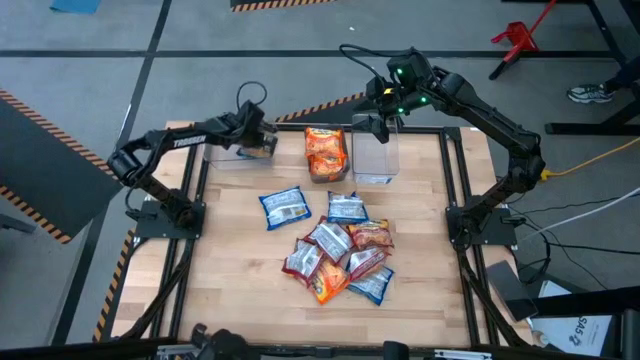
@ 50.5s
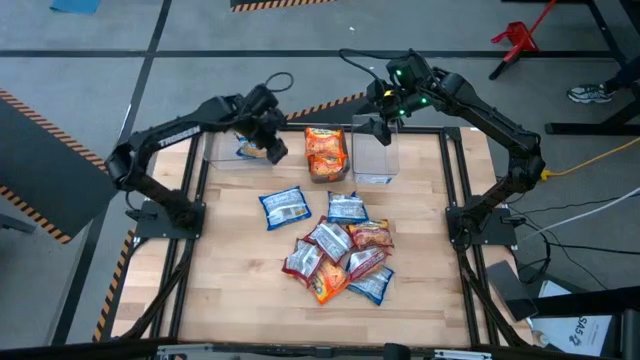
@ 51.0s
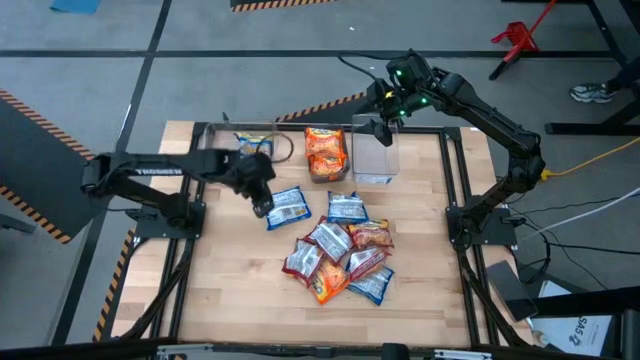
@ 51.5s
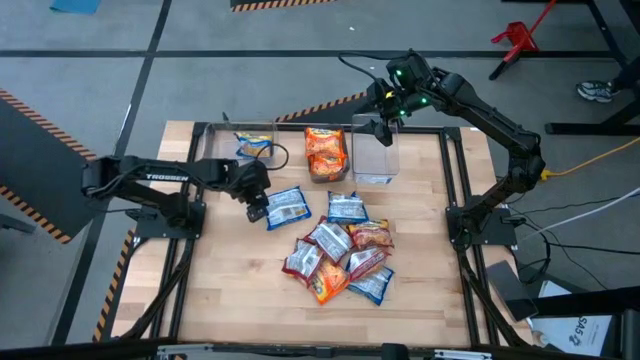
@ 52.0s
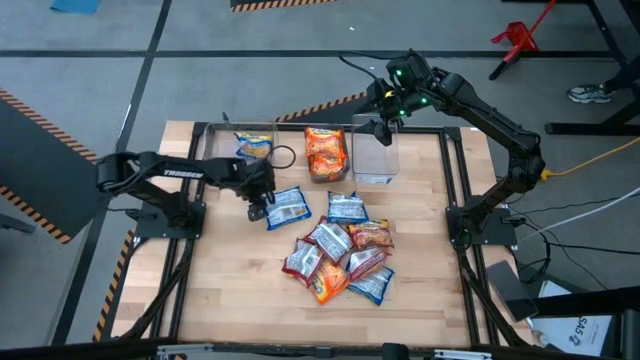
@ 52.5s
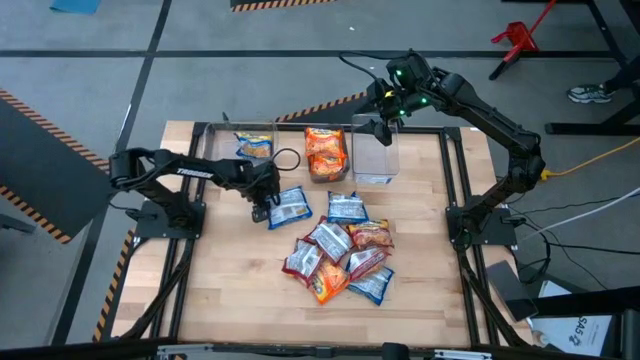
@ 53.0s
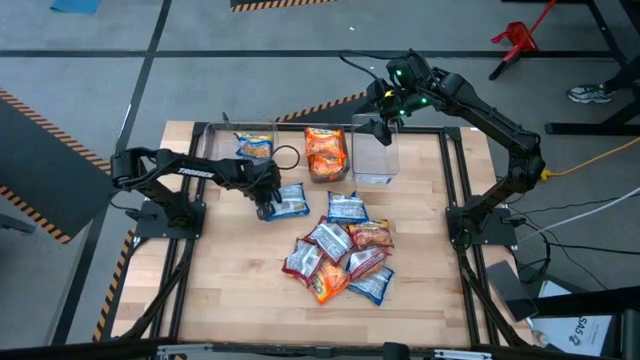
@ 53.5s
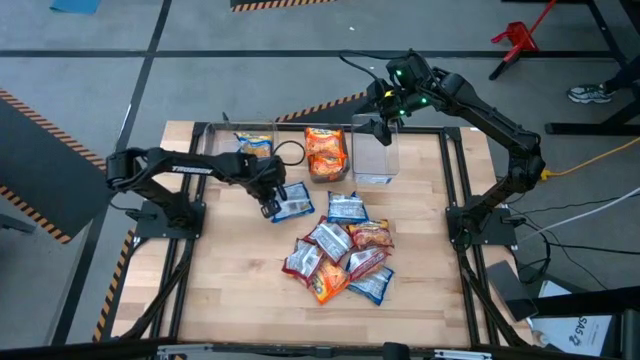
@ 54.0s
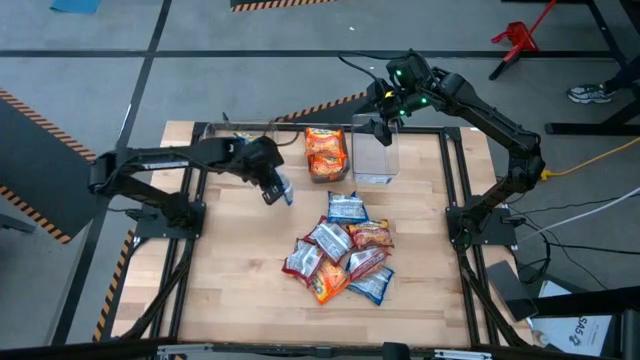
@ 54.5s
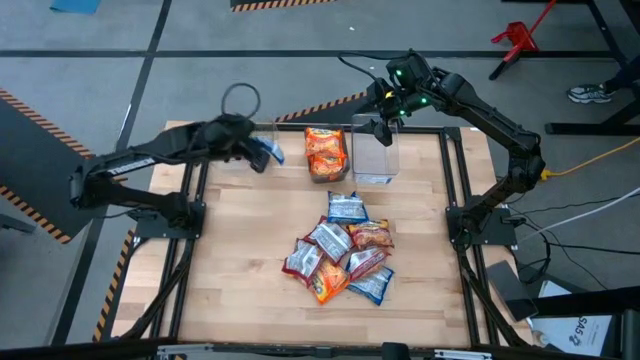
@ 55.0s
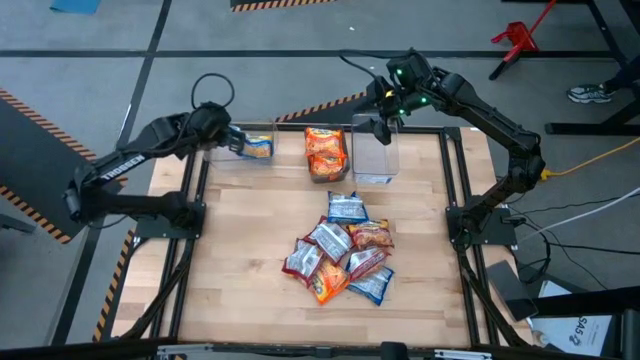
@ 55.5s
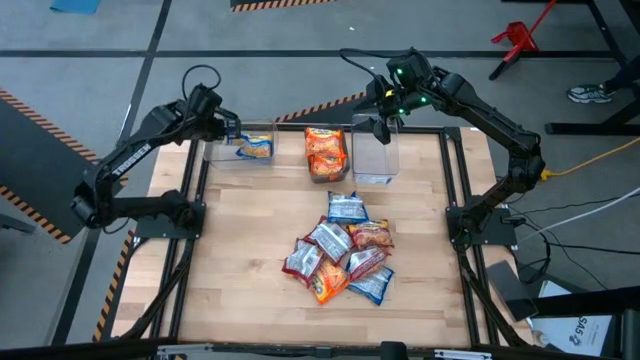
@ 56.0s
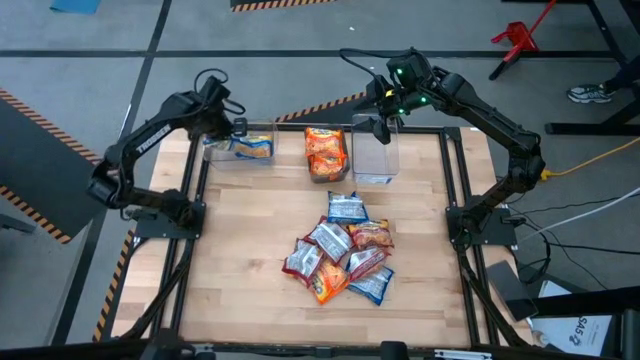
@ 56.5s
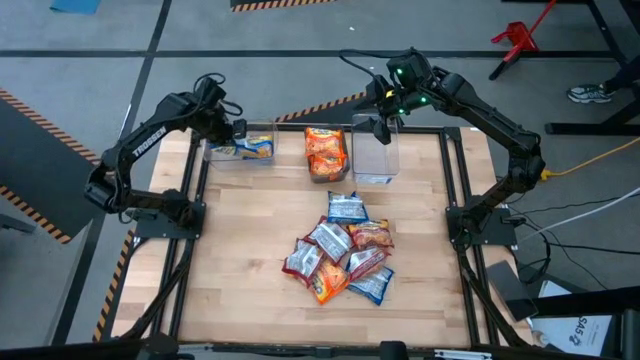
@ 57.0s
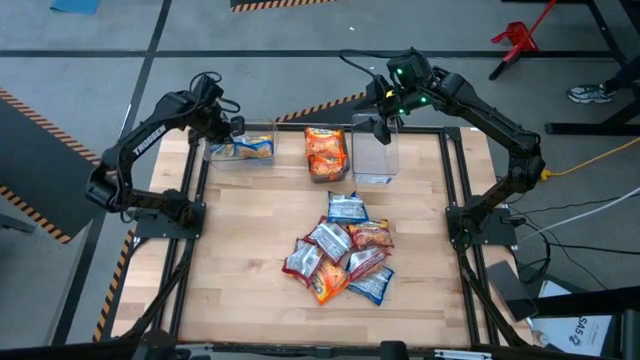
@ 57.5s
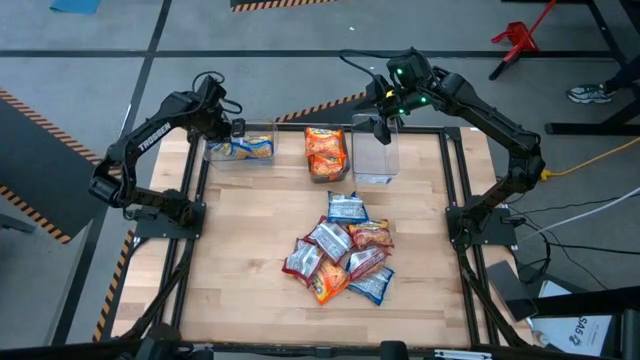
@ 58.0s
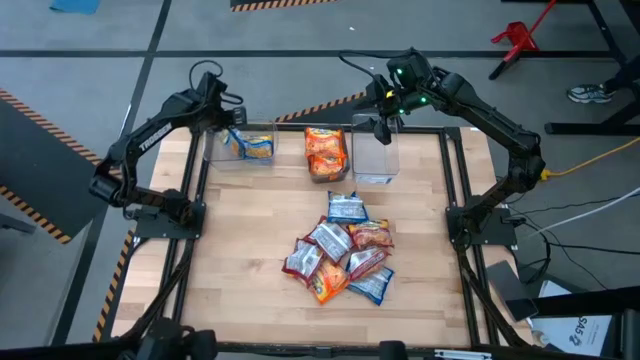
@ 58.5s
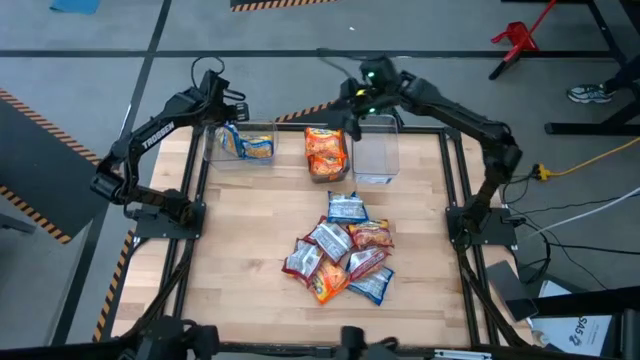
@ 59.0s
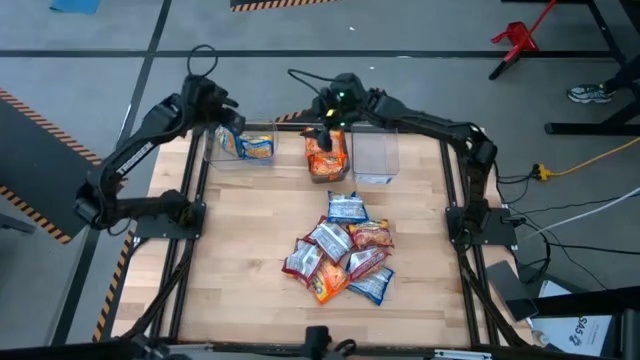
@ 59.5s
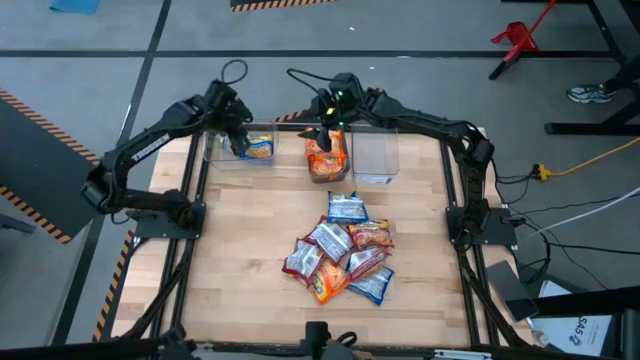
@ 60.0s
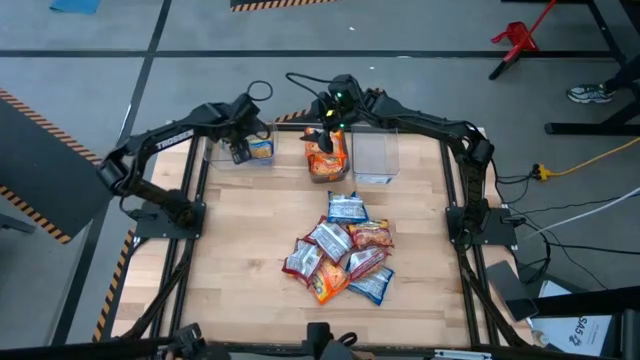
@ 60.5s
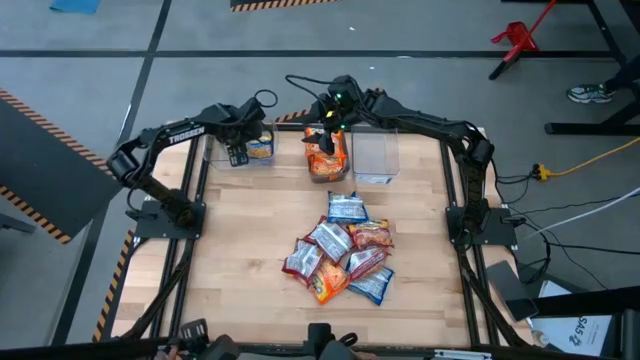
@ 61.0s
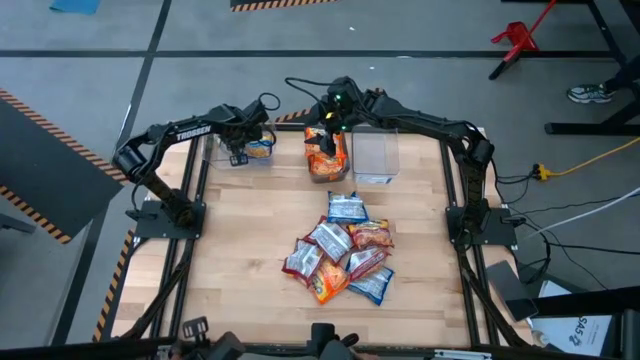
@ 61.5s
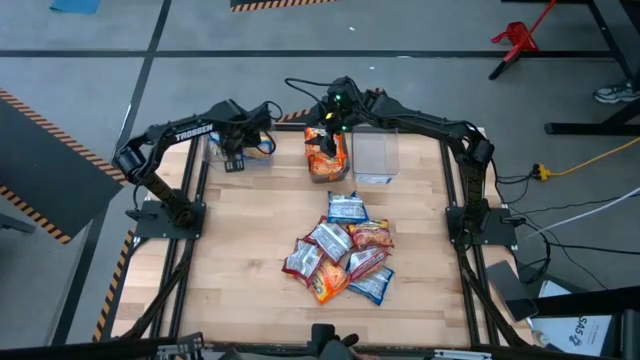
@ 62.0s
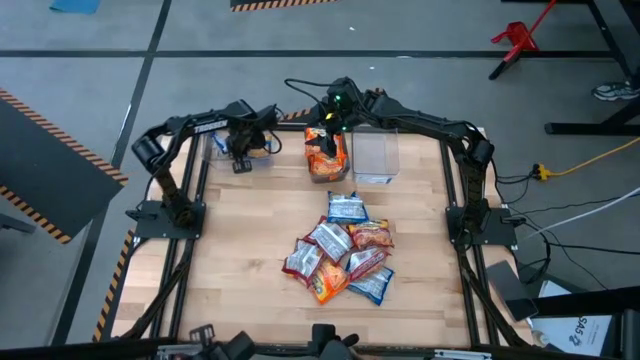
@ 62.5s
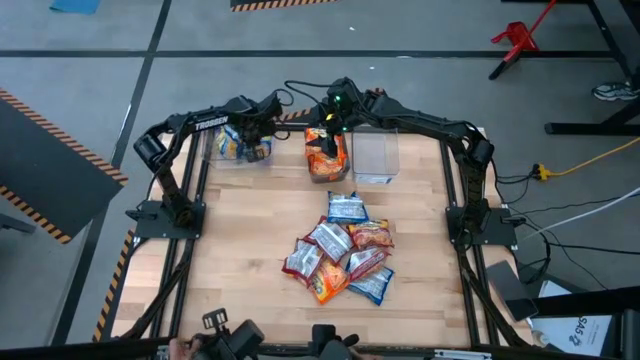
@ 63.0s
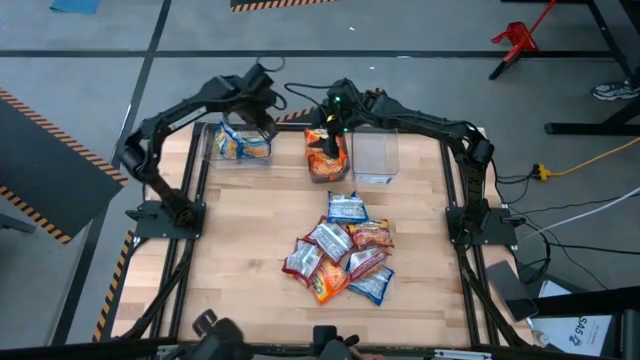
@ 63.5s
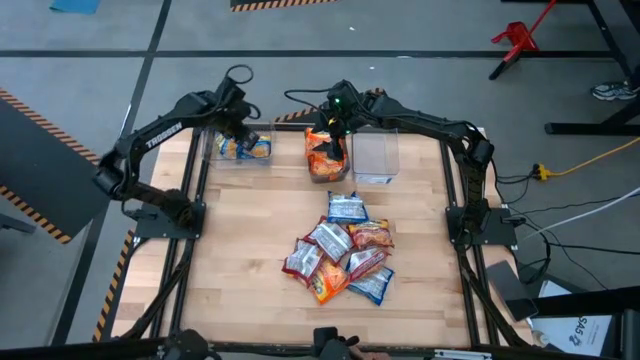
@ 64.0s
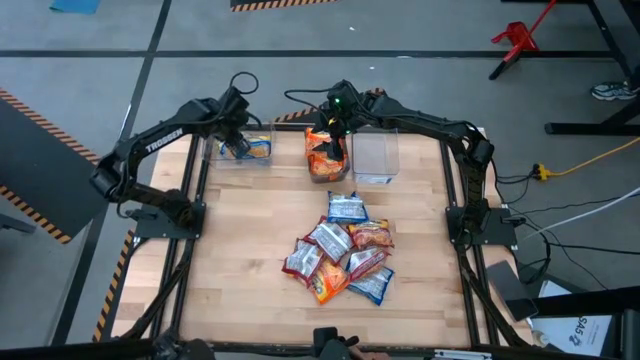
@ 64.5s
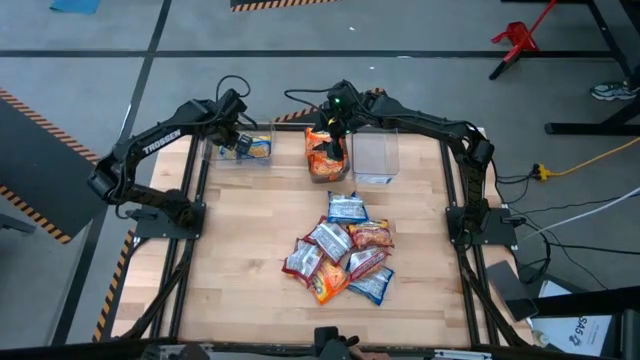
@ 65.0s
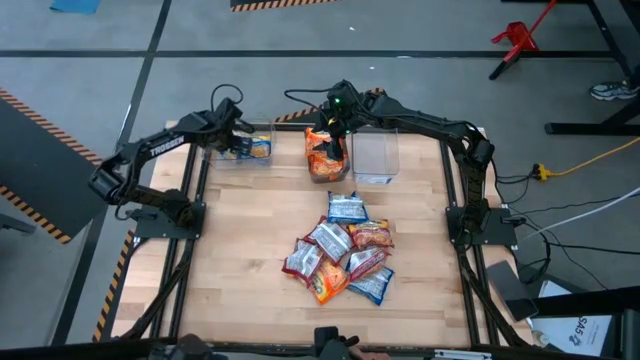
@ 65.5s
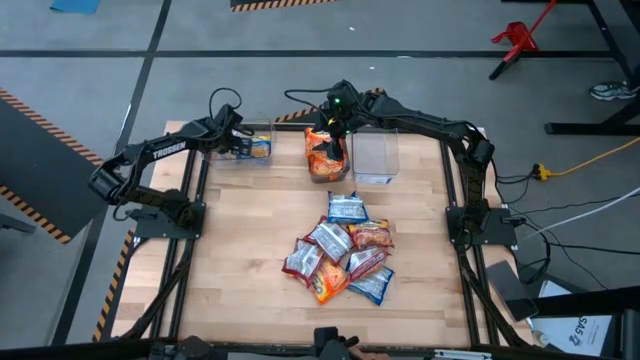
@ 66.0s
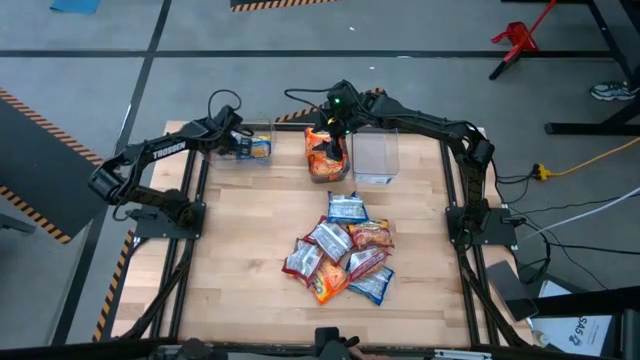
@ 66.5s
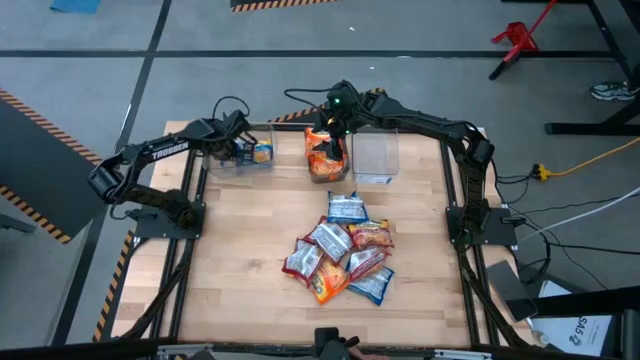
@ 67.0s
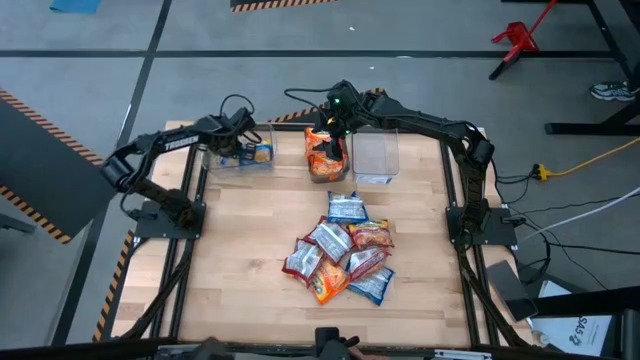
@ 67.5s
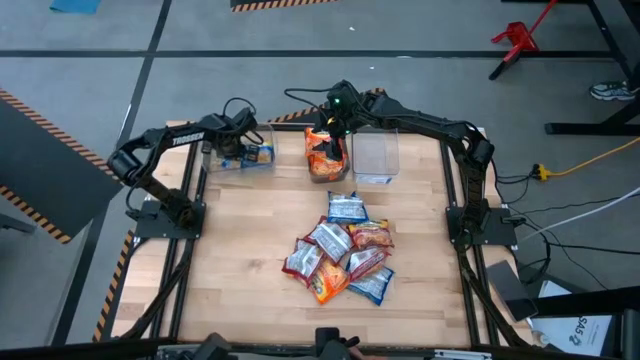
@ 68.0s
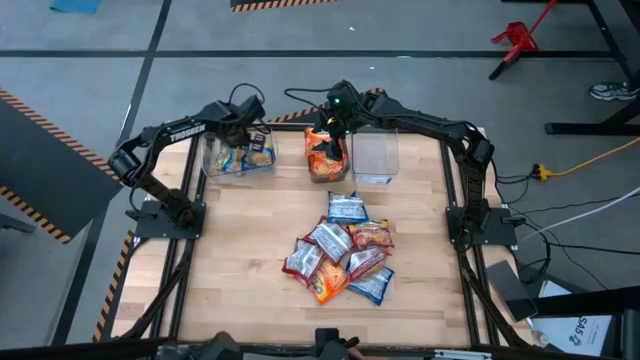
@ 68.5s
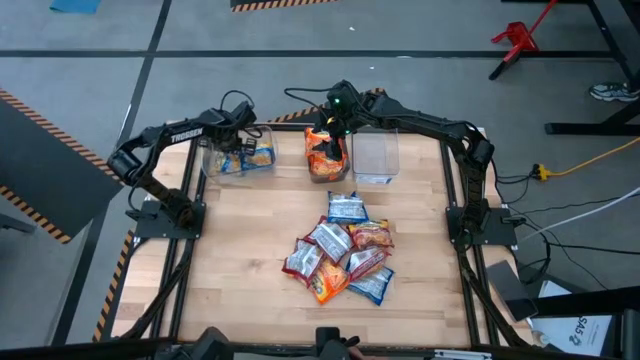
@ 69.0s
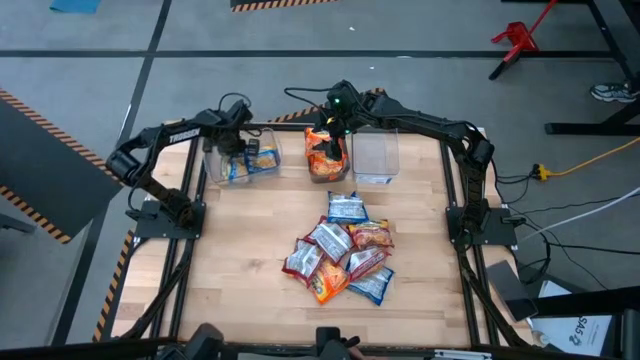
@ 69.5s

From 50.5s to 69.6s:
Task: Sort Maruchan noodles
Put the blue noodle pack into the left transparent bin
